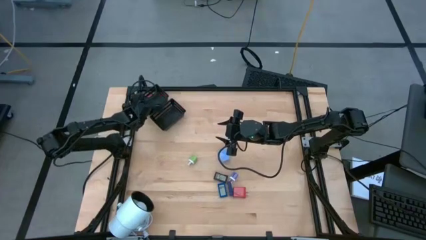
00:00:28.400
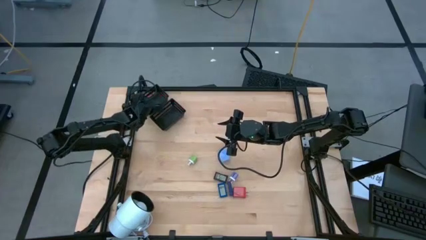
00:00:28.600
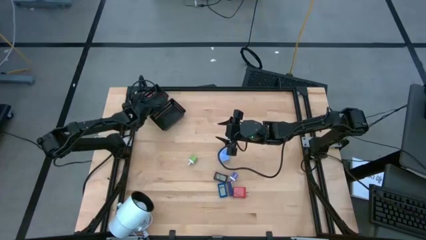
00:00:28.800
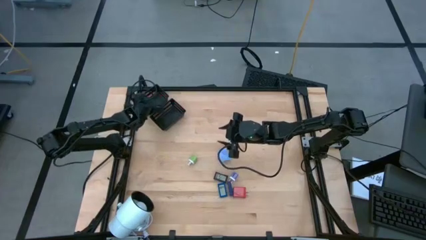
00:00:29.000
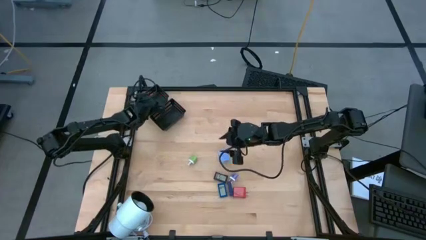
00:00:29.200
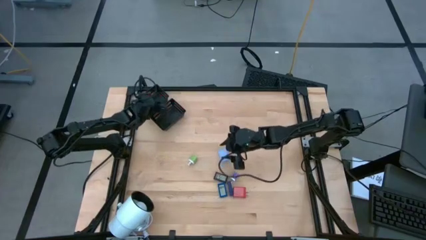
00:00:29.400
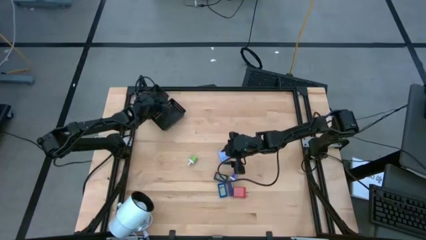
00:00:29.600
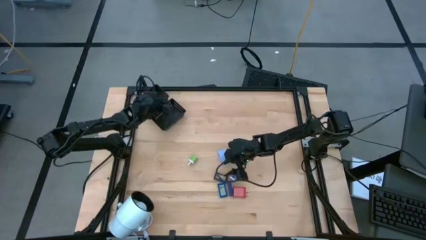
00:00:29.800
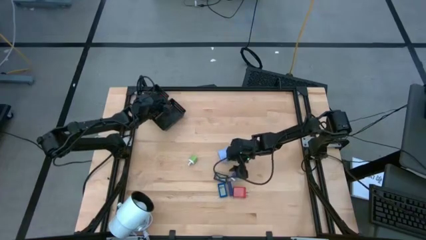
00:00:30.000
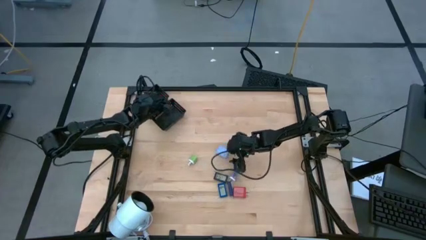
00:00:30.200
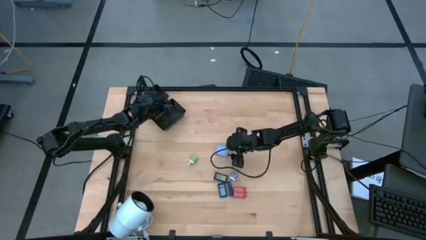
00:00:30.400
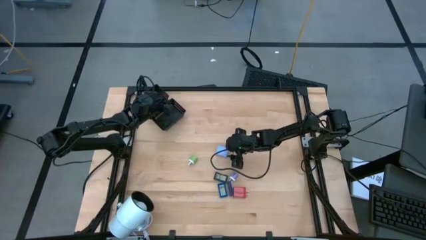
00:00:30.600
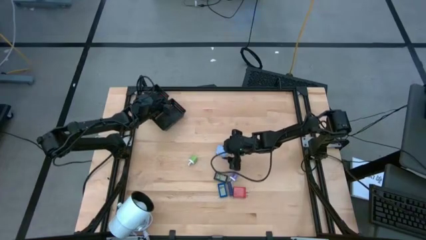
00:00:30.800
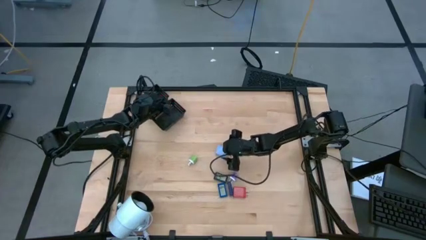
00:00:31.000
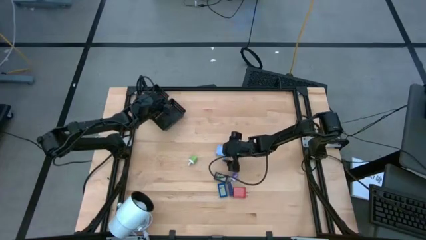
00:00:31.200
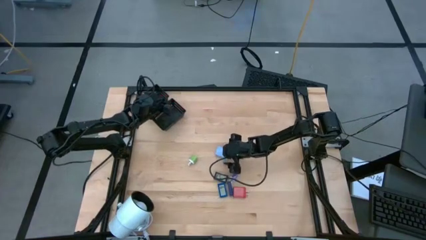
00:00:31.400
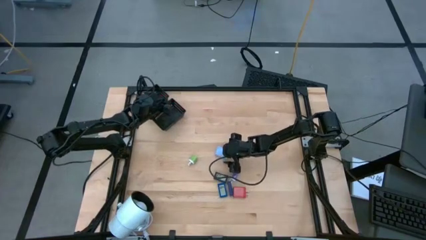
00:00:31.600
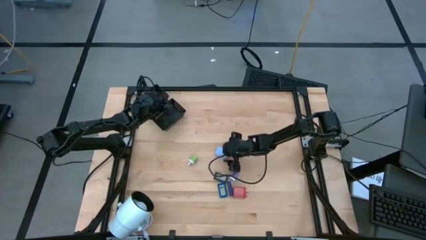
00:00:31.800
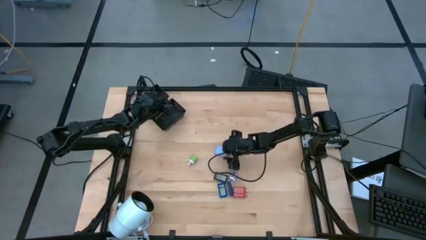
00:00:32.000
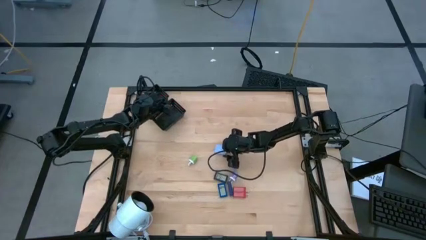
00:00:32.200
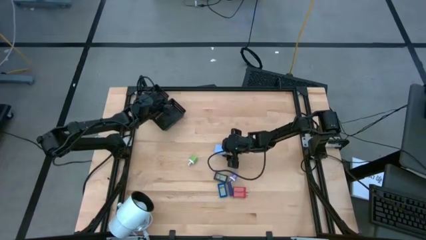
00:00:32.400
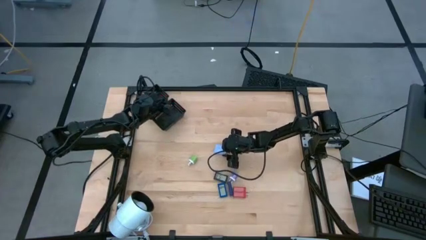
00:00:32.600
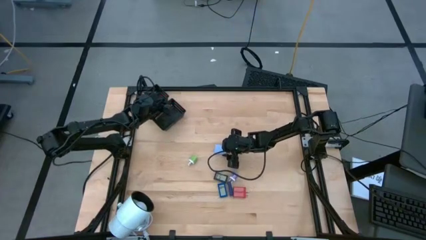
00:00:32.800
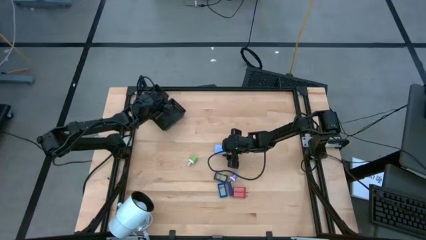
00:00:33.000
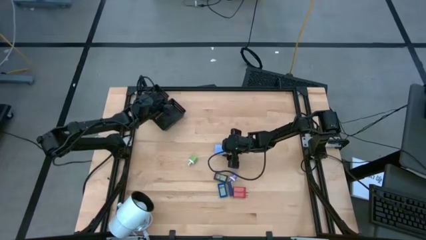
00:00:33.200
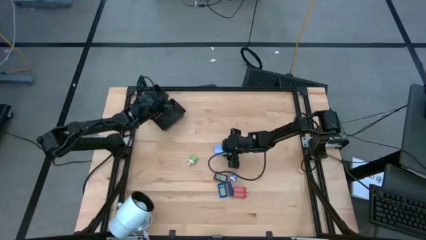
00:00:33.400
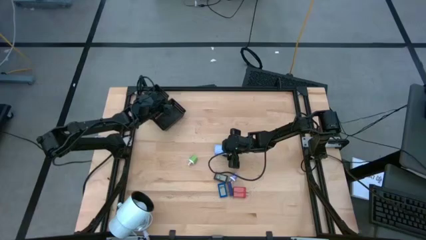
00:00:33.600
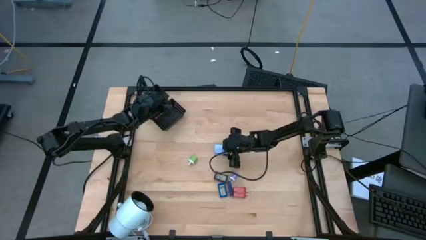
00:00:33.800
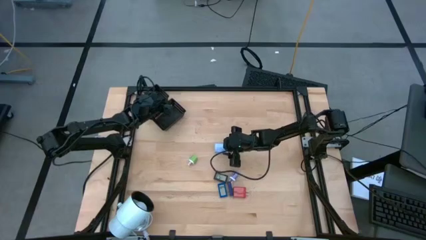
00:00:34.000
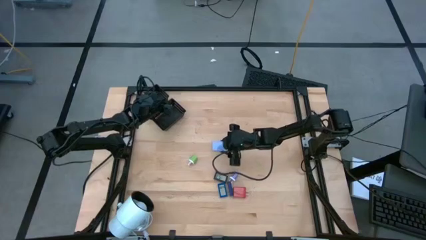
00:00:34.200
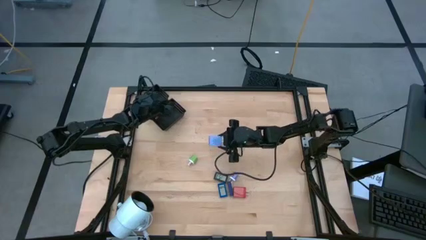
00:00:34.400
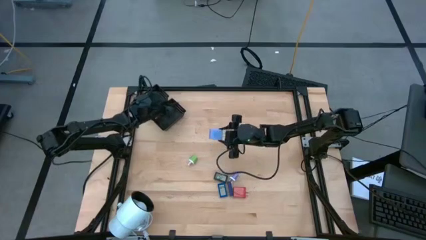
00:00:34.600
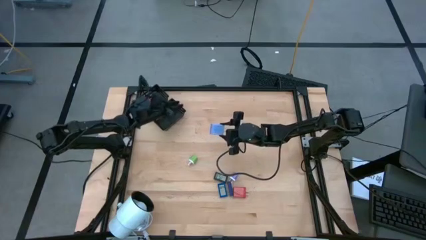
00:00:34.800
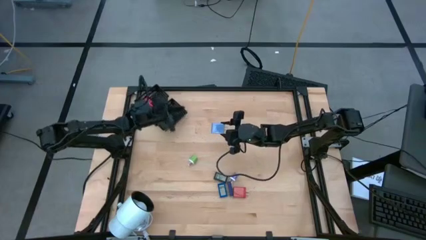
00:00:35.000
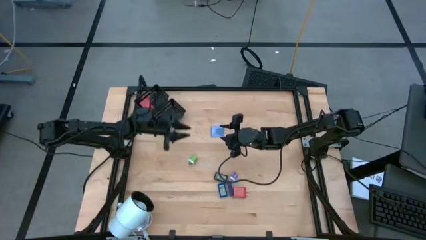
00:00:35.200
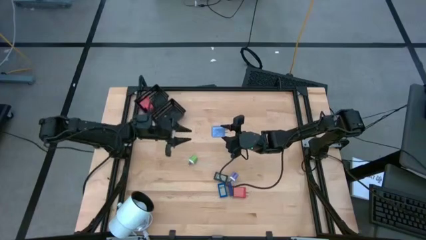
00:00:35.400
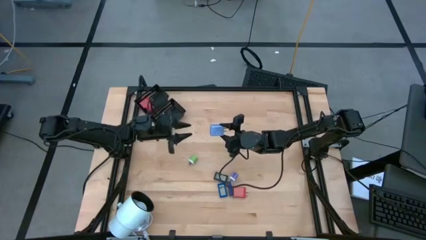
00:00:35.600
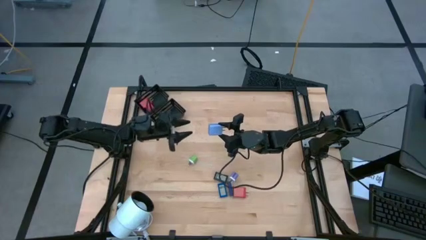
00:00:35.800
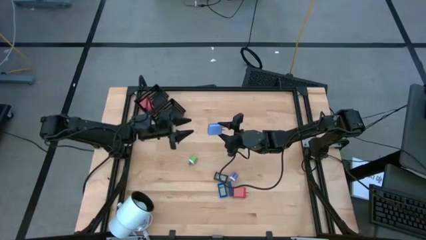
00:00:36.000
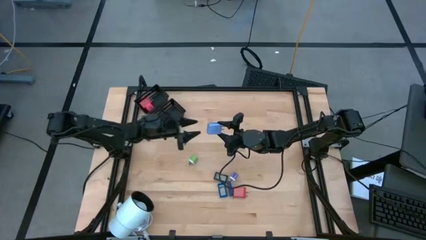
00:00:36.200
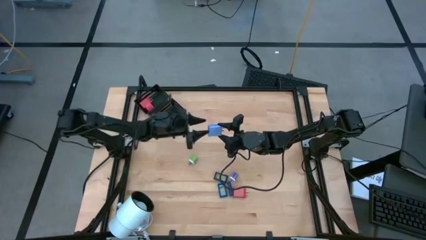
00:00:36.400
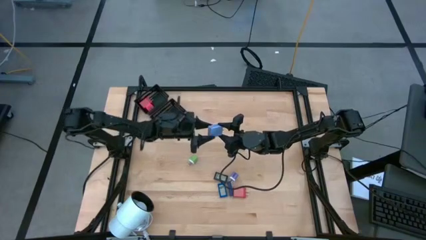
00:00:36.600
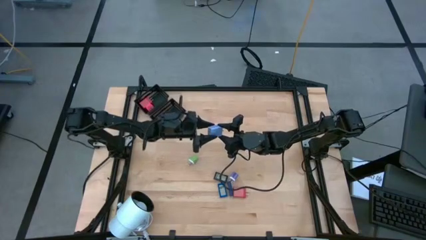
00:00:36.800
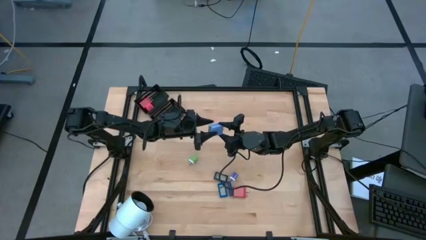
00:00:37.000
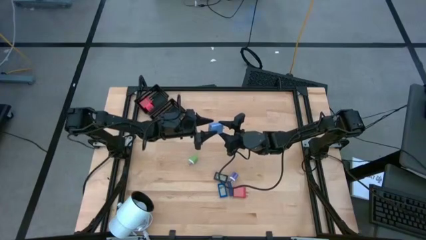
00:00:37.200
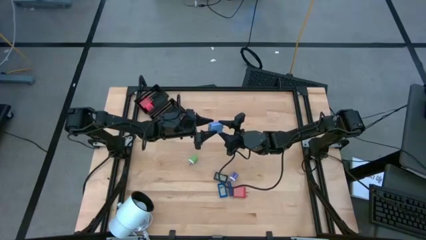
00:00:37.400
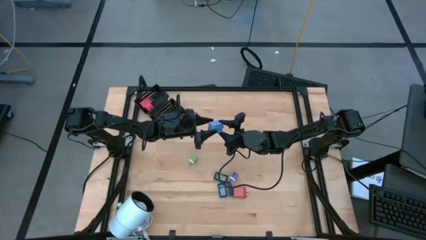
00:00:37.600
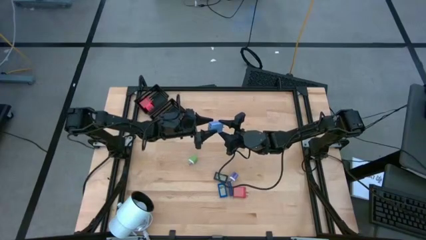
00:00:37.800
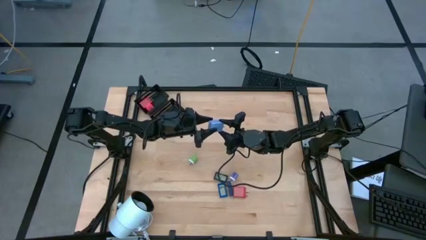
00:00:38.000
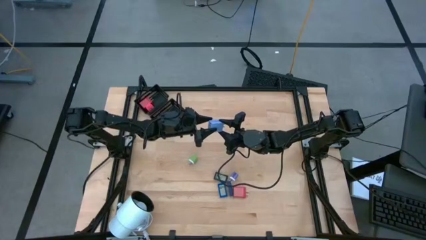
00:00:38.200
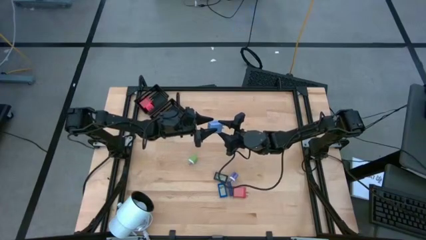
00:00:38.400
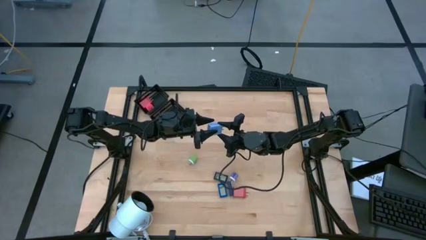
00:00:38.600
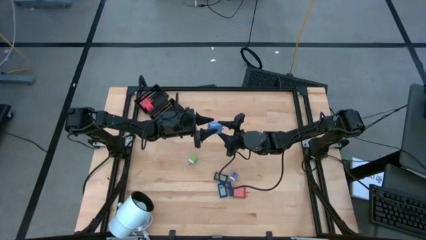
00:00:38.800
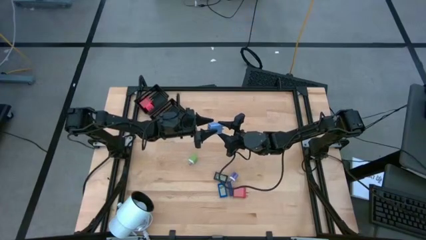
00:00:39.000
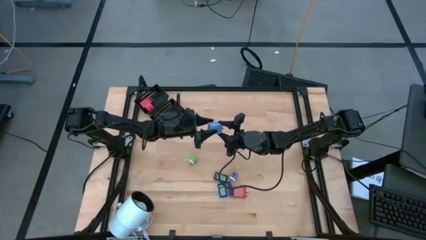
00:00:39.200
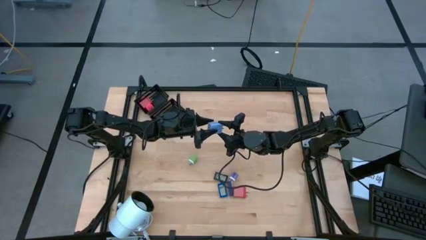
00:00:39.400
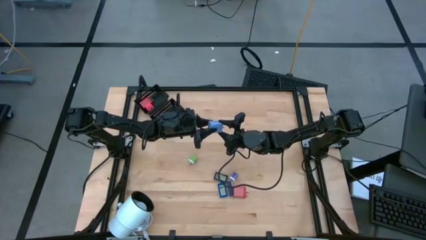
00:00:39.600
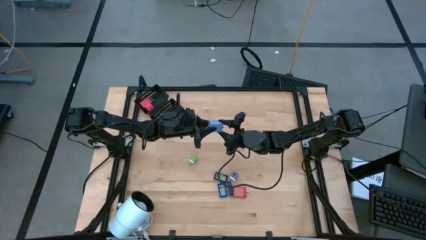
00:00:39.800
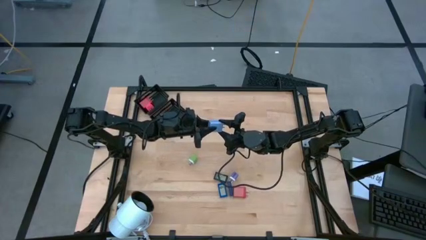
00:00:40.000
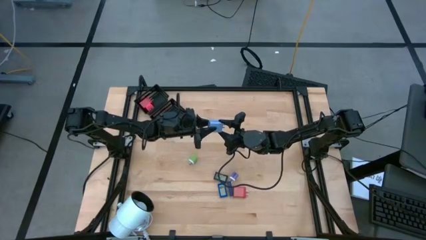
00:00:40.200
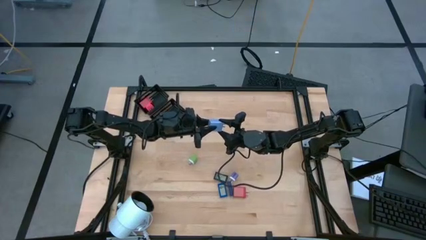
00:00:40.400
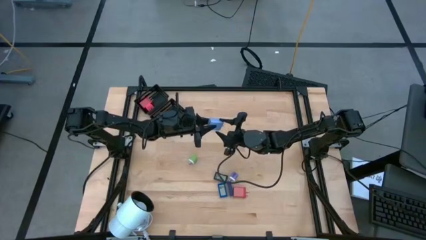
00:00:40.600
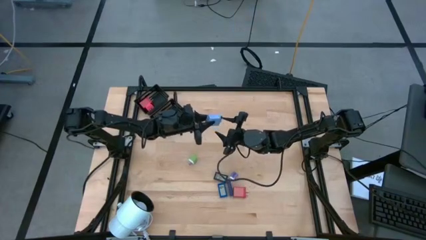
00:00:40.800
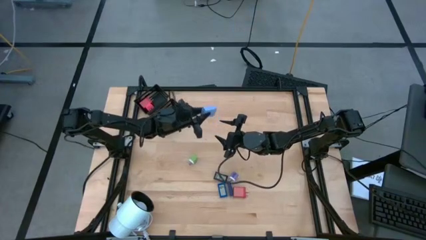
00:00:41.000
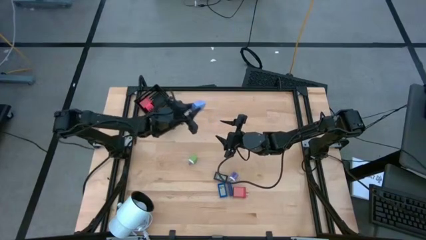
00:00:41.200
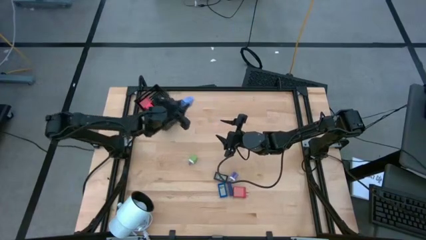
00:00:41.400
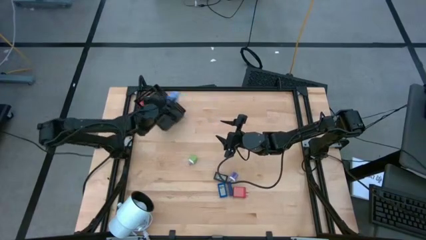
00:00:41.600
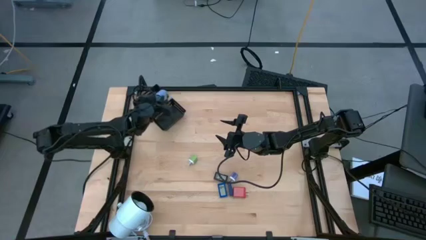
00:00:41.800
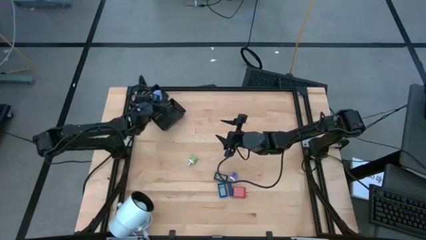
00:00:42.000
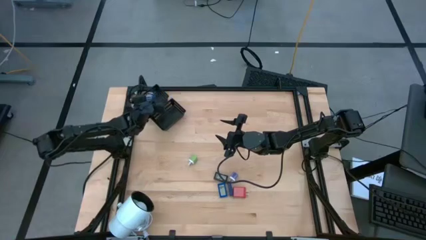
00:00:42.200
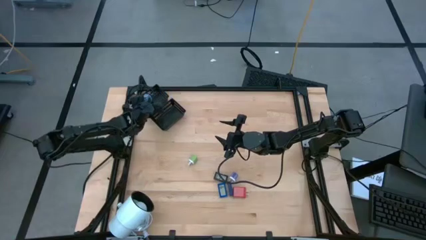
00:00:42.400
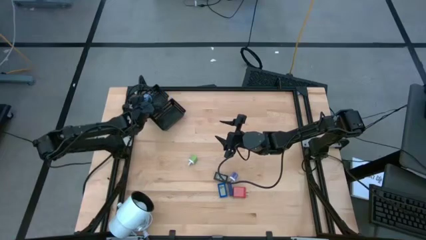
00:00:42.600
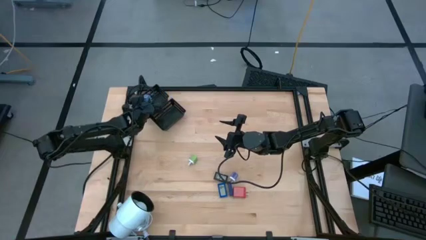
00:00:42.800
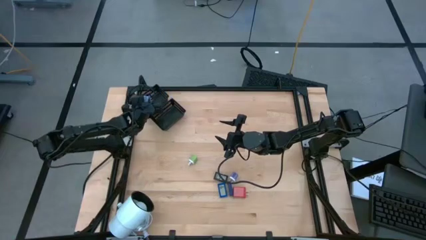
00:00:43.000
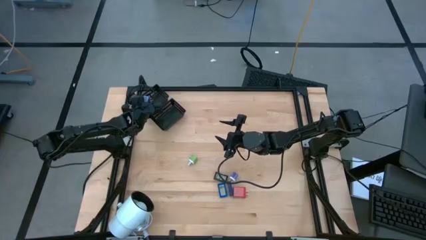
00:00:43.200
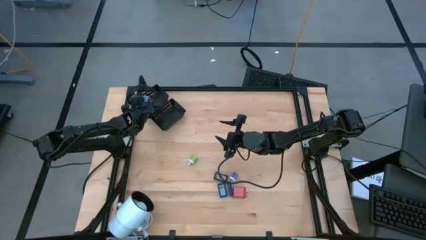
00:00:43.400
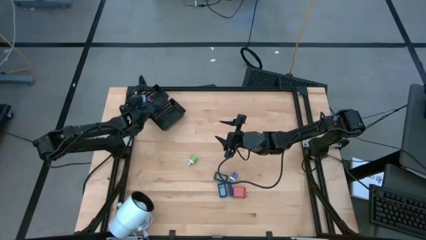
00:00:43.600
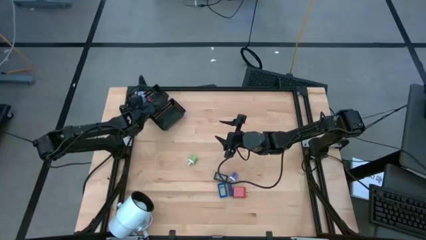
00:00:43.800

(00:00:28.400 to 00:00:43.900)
Task: Pick & Place Office items
Put the light blue charger adapter into the top black bin
